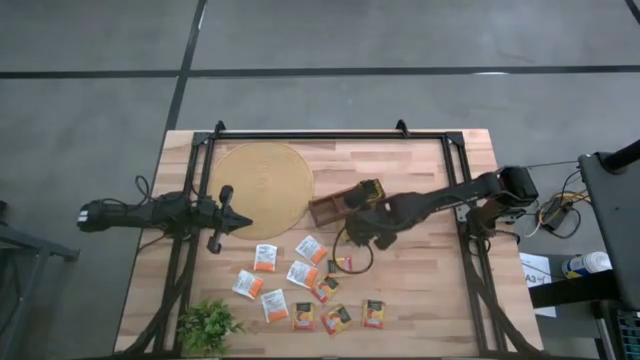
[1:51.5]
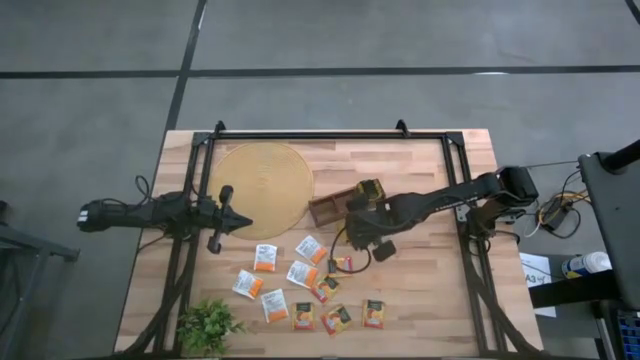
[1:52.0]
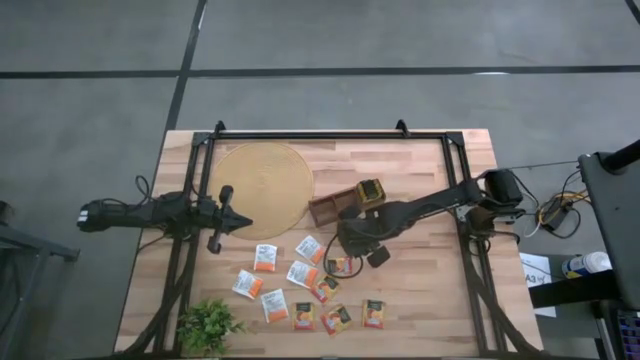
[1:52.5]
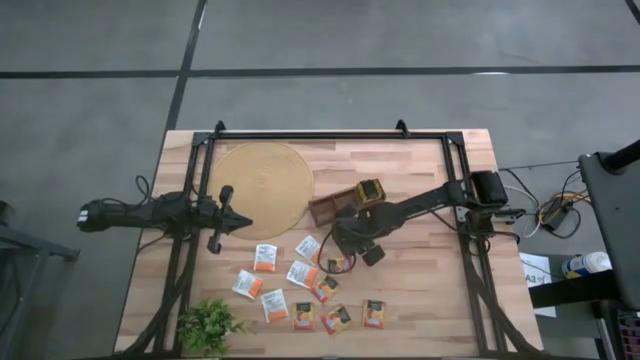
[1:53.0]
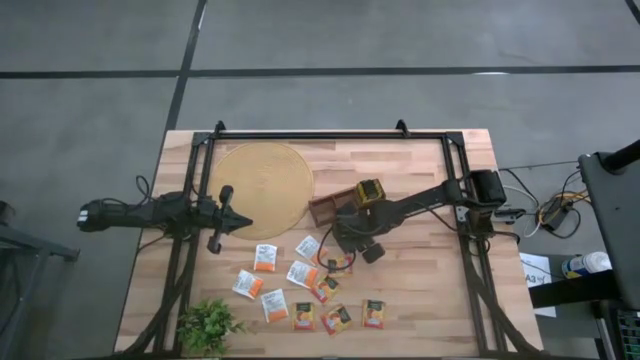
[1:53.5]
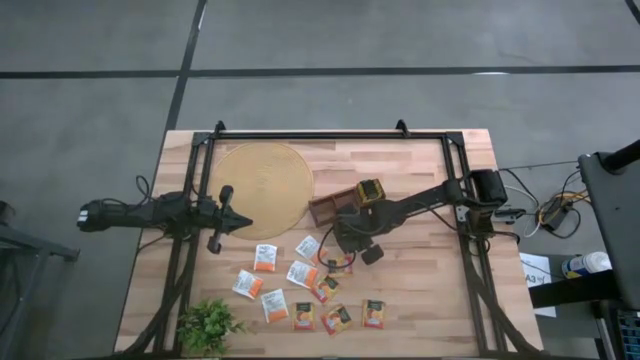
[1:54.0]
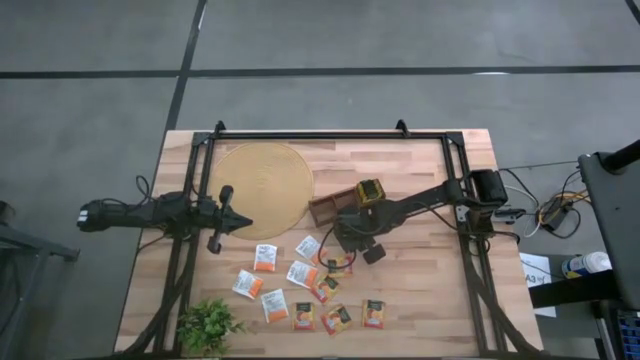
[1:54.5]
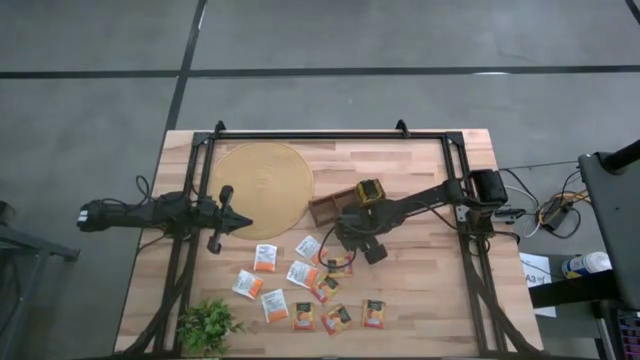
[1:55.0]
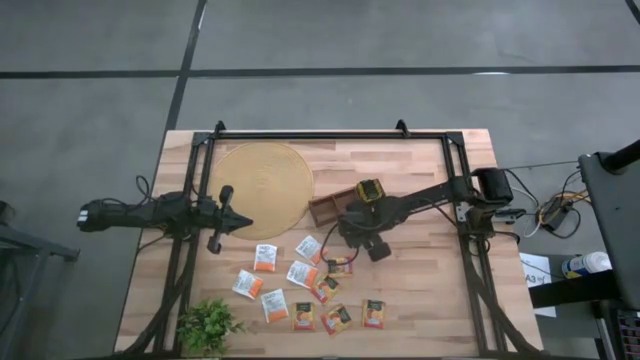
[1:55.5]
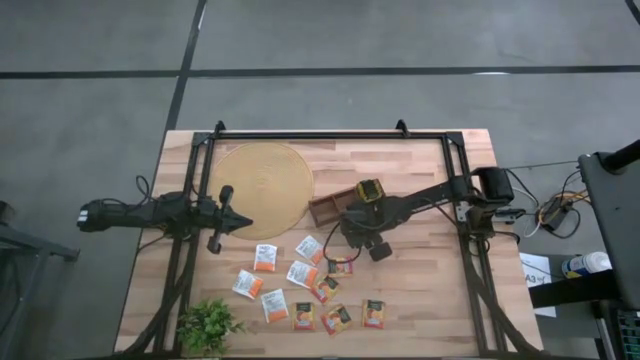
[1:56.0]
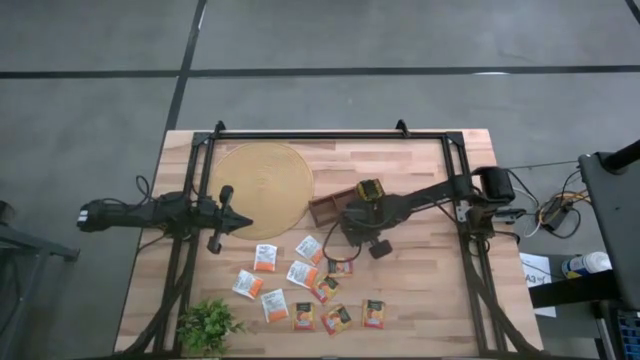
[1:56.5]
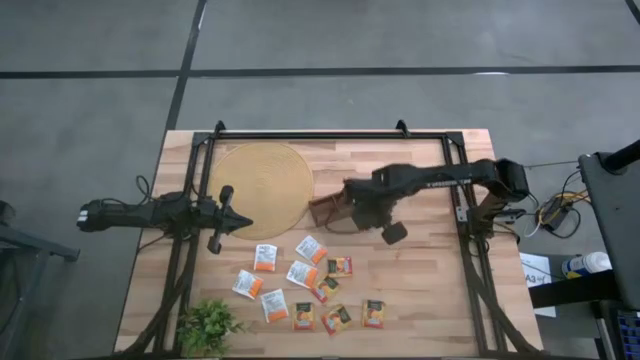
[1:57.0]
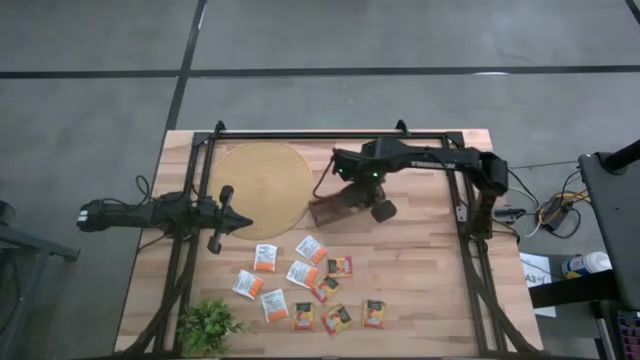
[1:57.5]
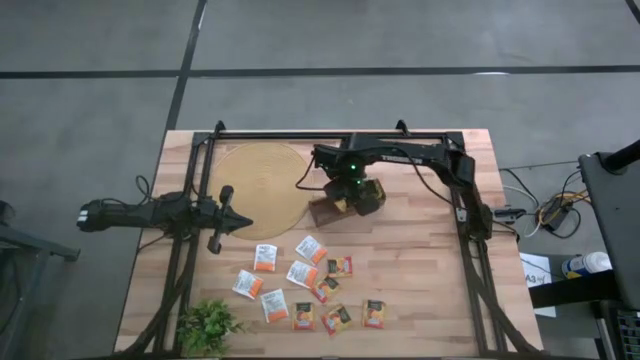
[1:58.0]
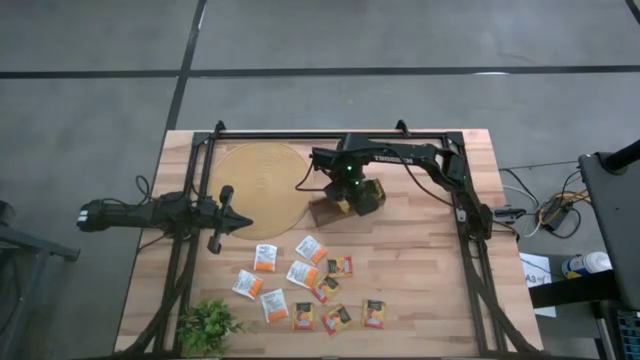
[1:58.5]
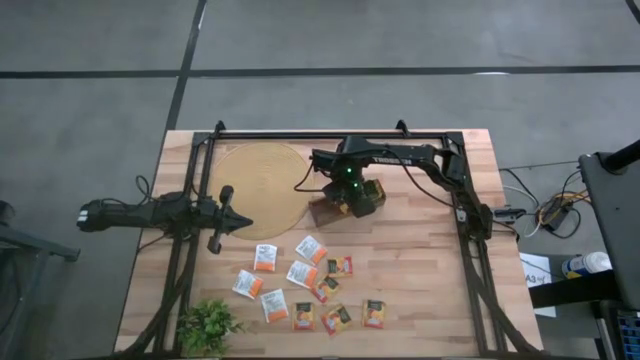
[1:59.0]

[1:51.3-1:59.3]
Task: Pick & Place Tea
Put the orange tea bag into the middle section of the wooden organizer

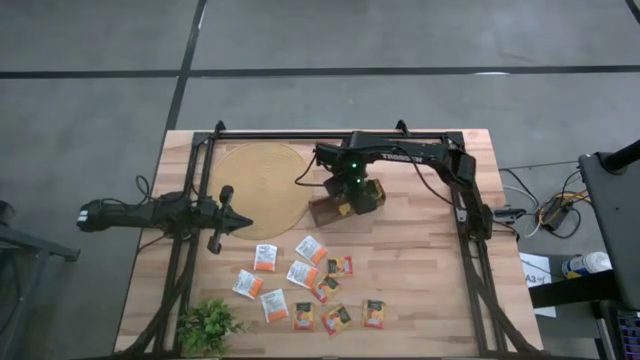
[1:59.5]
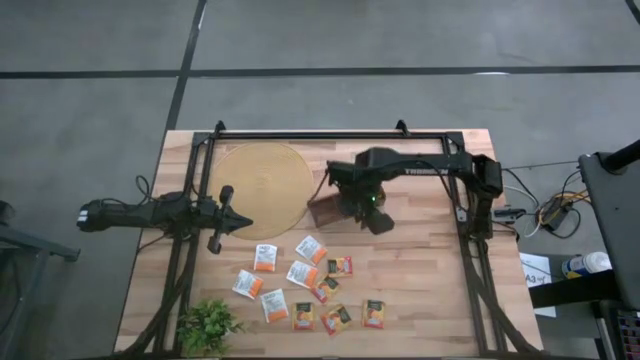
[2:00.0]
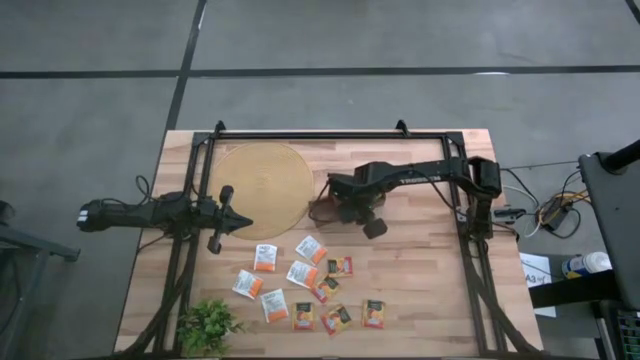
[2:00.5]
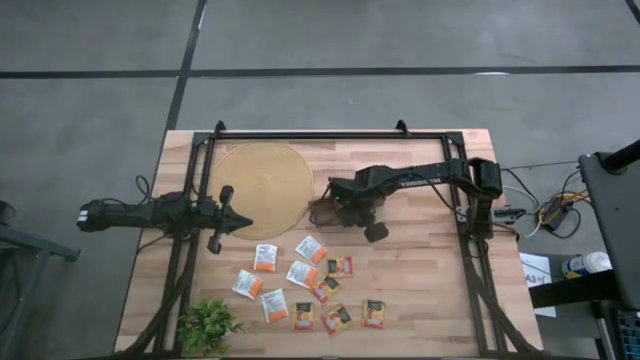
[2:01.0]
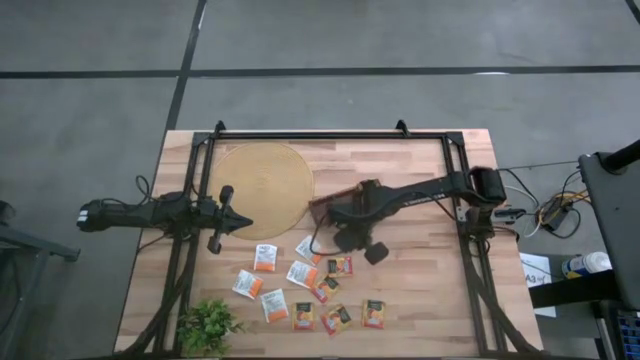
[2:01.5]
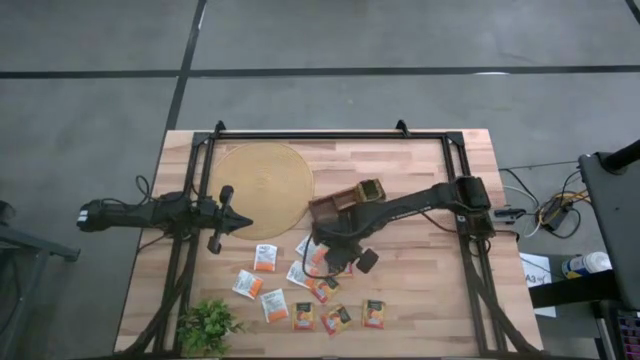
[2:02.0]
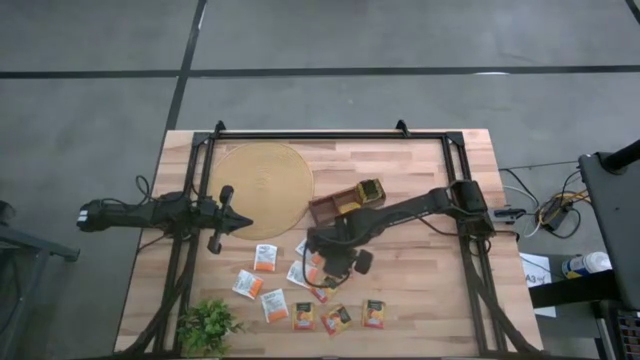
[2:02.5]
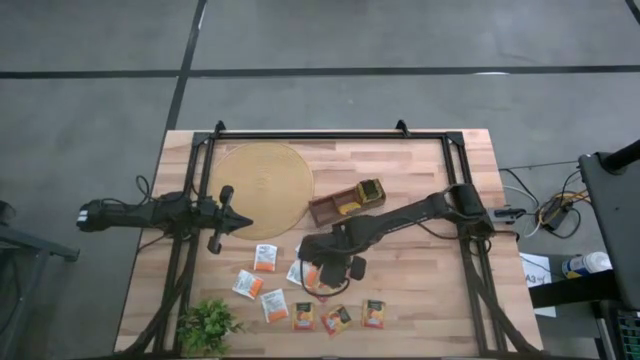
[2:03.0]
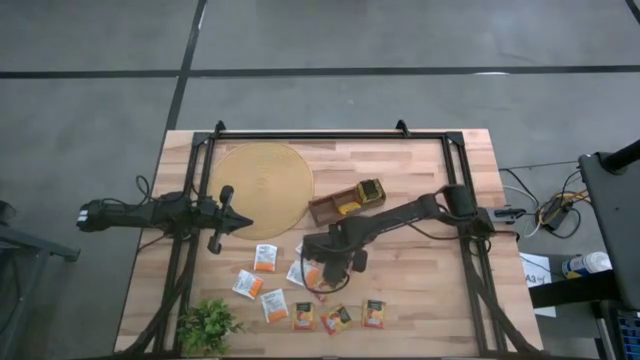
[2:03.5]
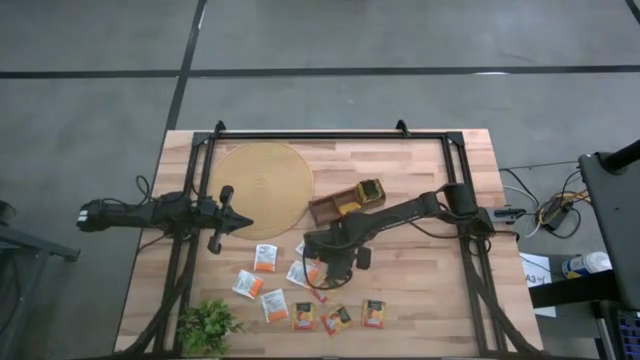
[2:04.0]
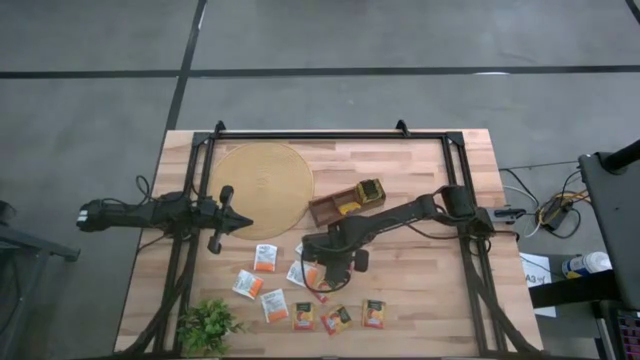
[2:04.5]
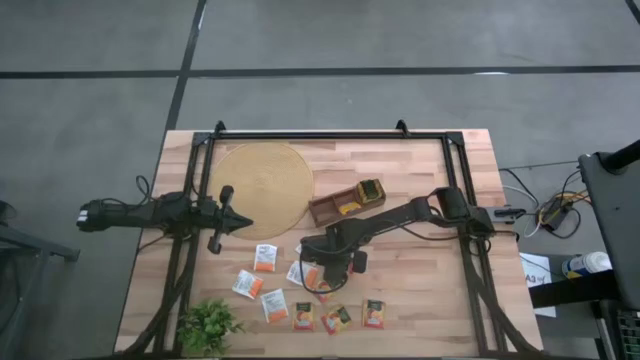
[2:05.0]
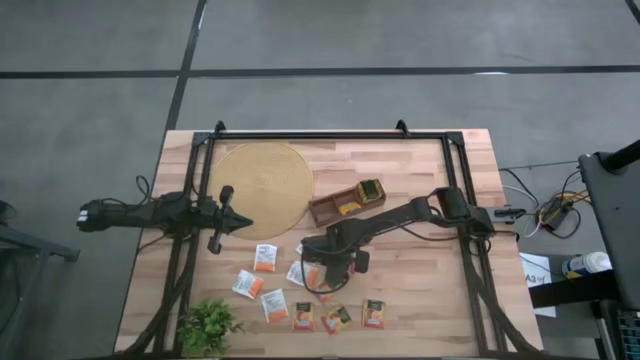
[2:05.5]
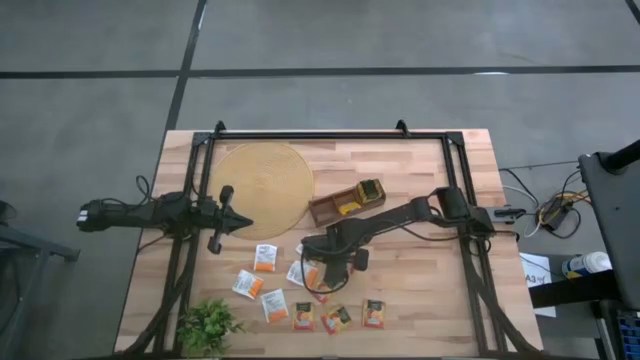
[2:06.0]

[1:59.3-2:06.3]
Put the orange tea bag into the middle section of the wooden organizer

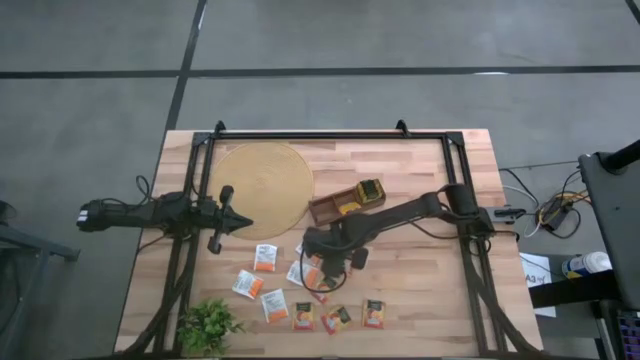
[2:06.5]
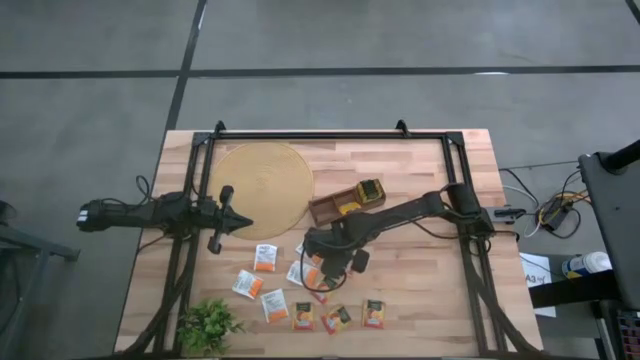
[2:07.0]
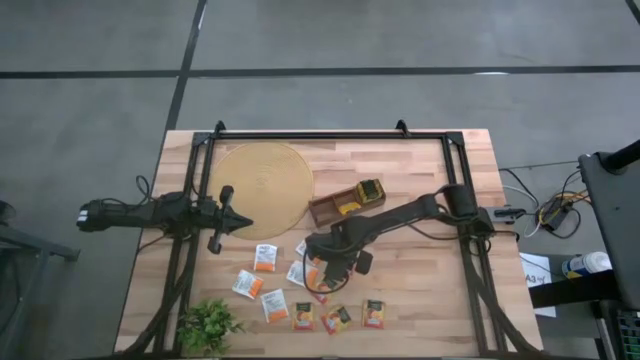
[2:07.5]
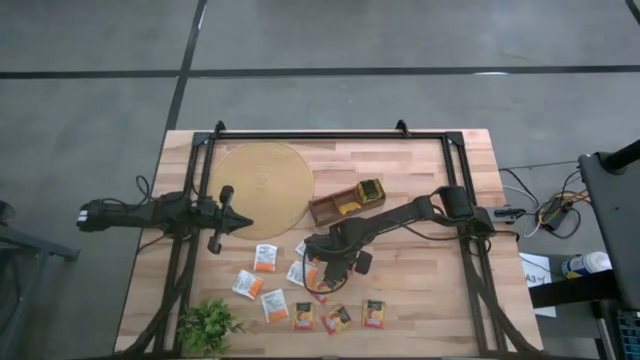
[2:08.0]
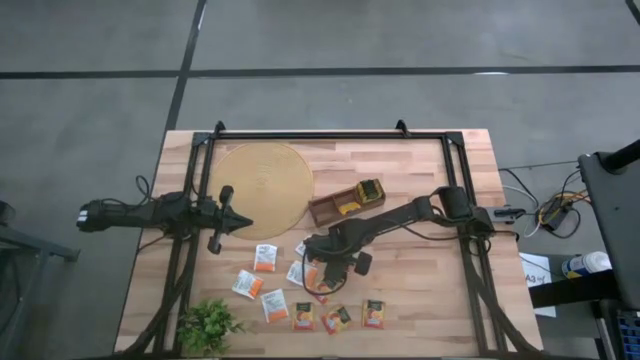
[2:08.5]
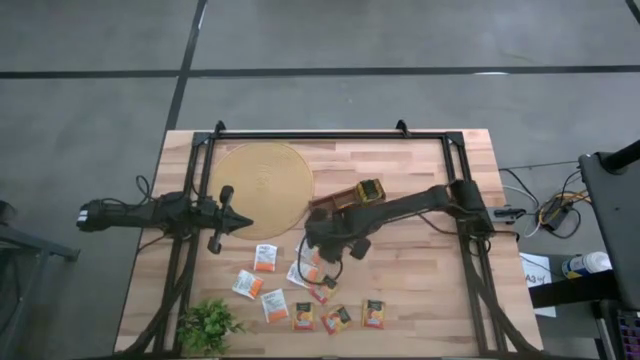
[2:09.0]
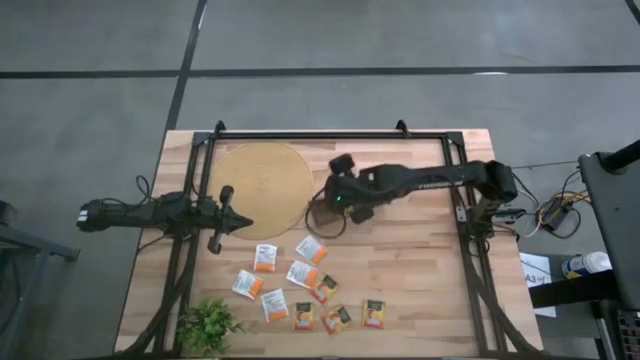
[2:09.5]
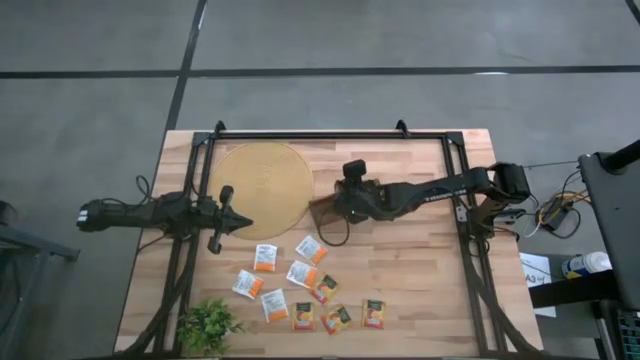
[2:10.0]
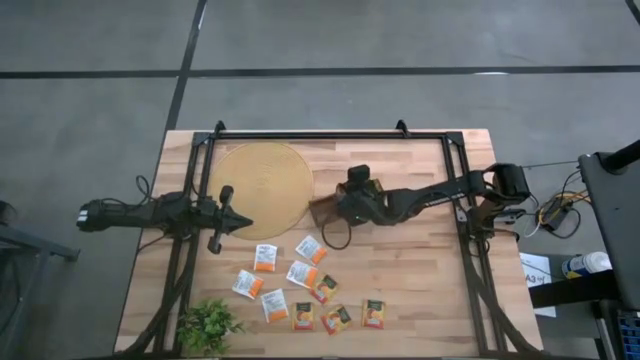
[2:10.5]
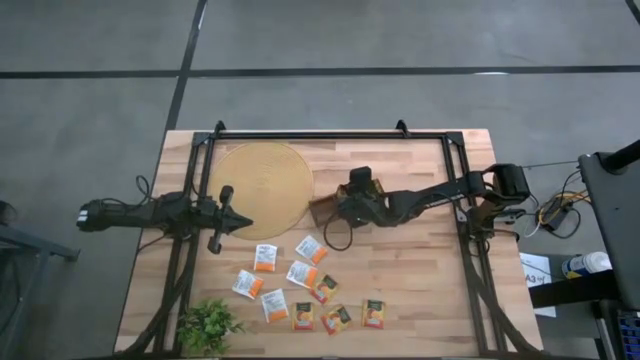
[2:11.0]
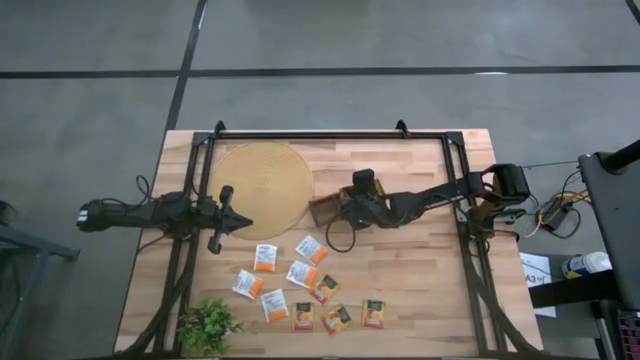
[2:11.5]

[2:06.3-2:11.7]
Put the orange tea bag into the middle section of the wooden organizer
